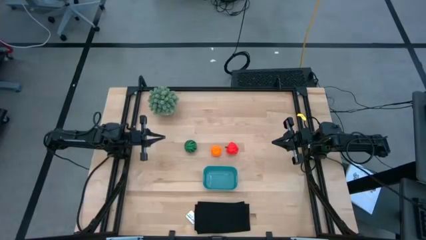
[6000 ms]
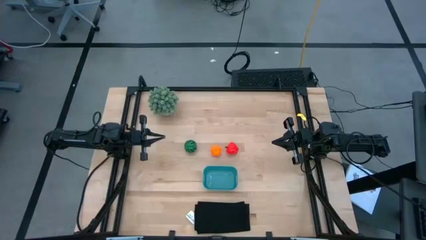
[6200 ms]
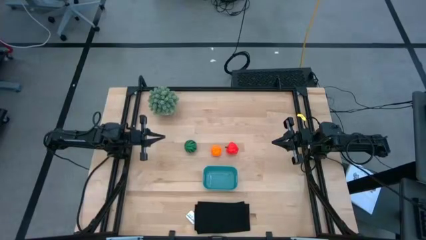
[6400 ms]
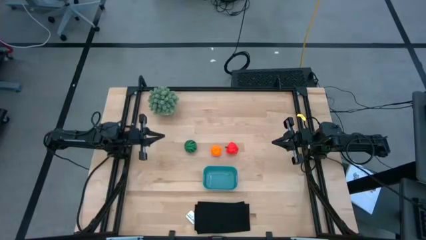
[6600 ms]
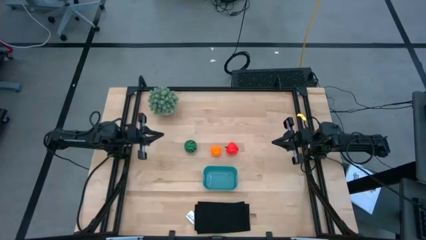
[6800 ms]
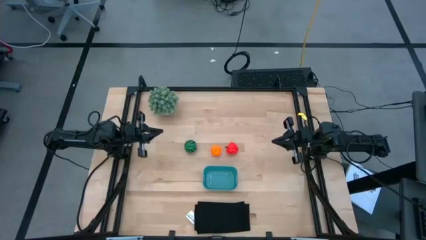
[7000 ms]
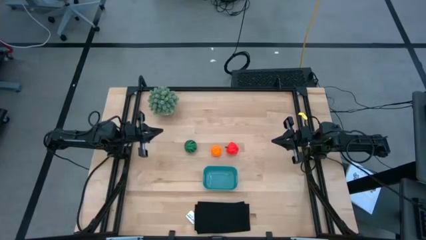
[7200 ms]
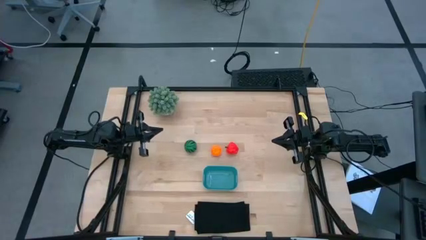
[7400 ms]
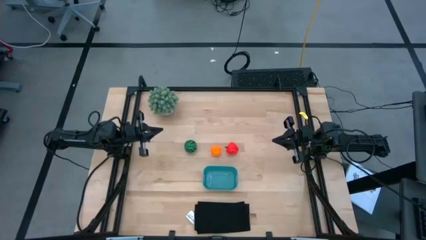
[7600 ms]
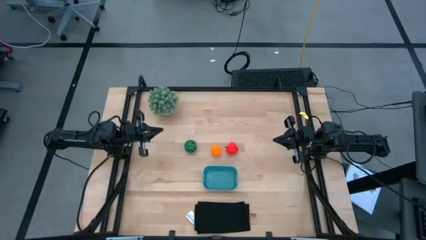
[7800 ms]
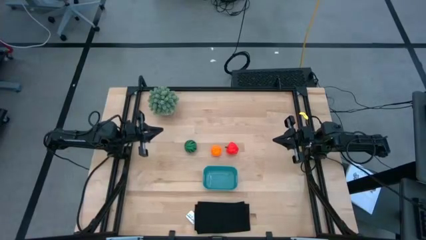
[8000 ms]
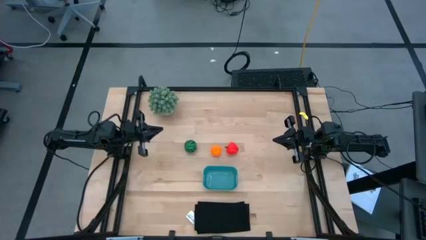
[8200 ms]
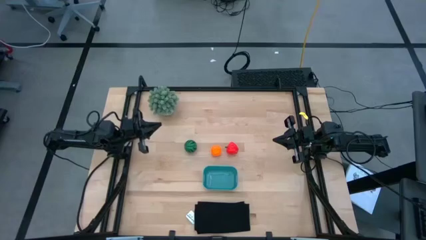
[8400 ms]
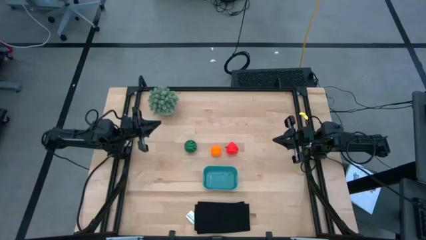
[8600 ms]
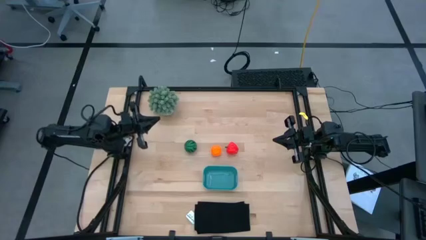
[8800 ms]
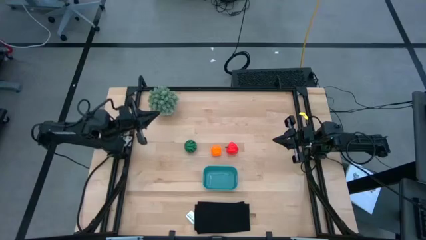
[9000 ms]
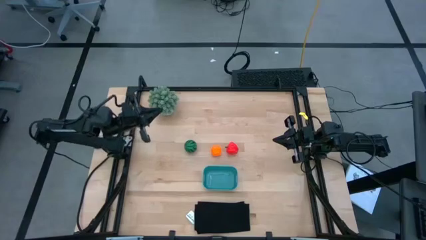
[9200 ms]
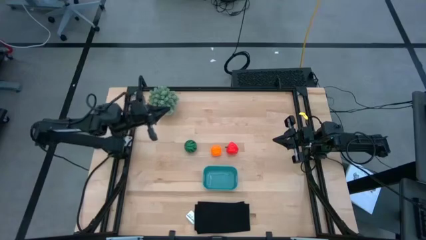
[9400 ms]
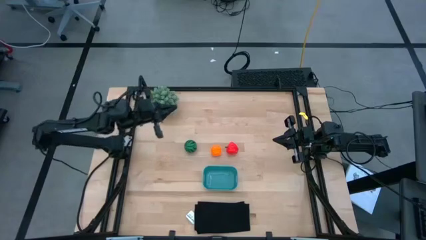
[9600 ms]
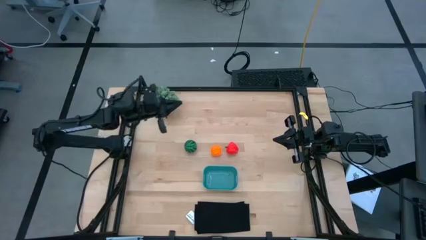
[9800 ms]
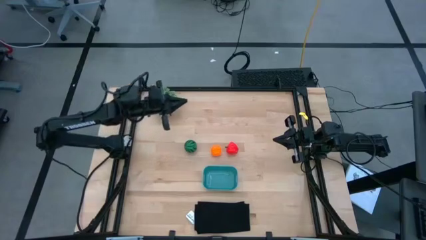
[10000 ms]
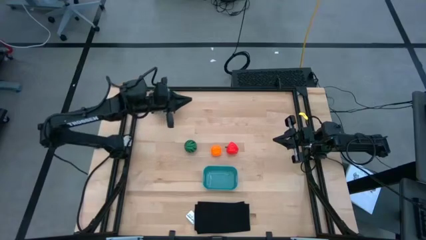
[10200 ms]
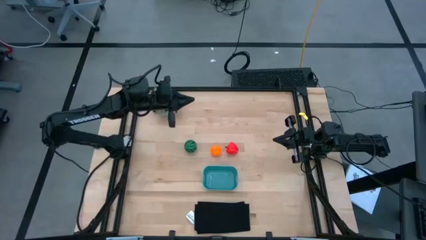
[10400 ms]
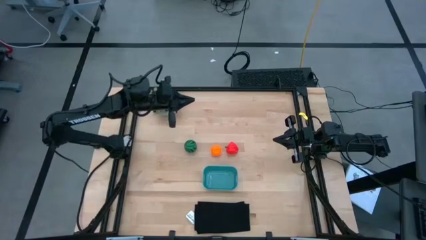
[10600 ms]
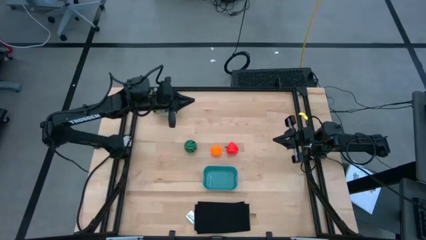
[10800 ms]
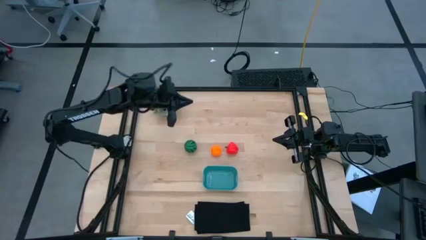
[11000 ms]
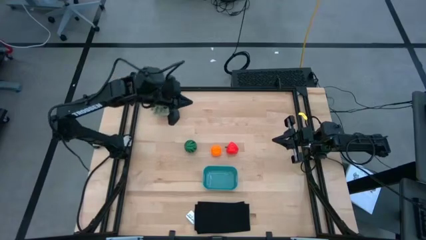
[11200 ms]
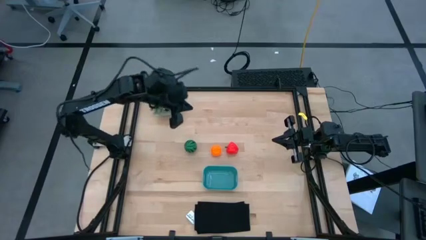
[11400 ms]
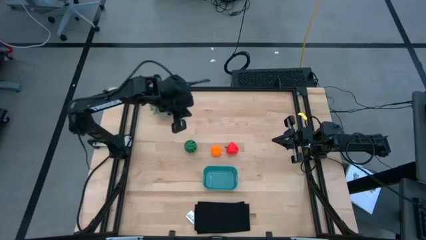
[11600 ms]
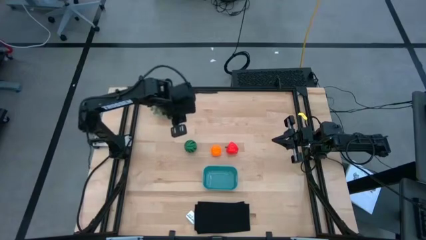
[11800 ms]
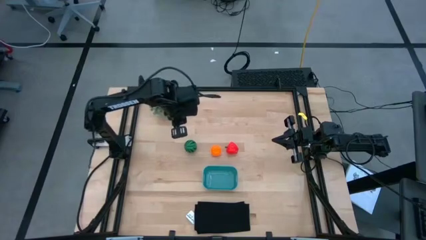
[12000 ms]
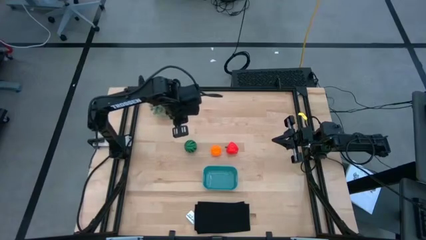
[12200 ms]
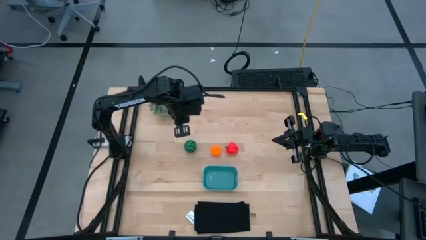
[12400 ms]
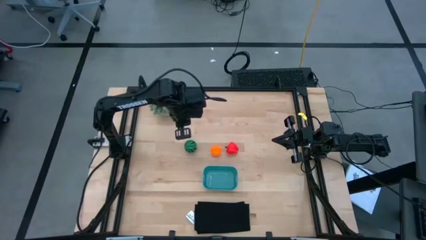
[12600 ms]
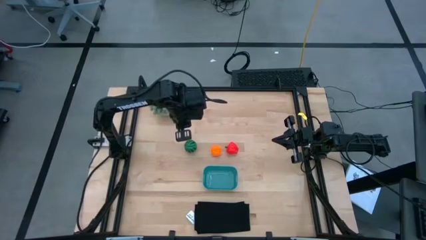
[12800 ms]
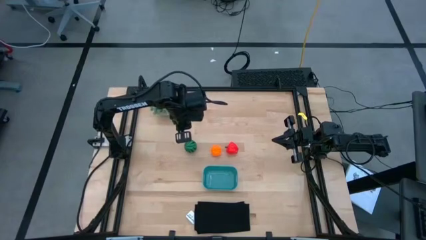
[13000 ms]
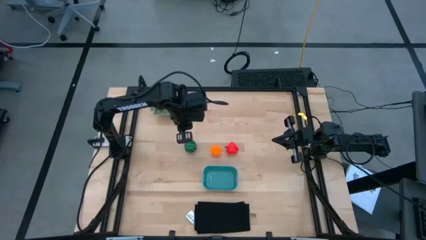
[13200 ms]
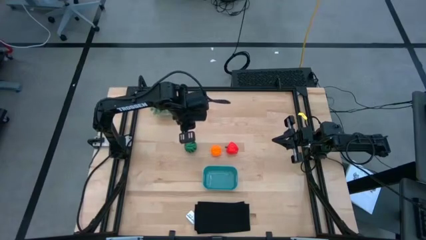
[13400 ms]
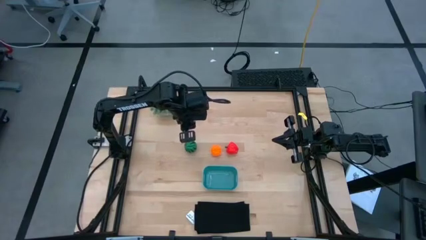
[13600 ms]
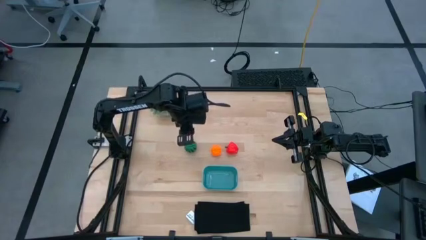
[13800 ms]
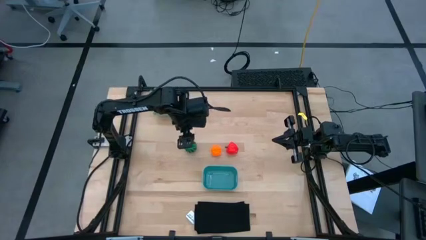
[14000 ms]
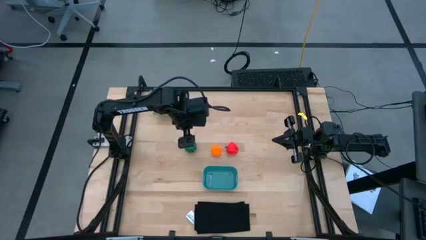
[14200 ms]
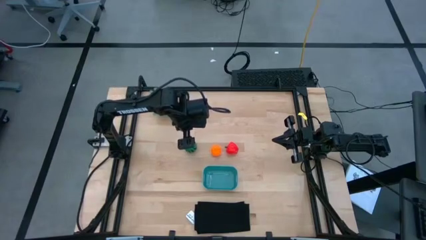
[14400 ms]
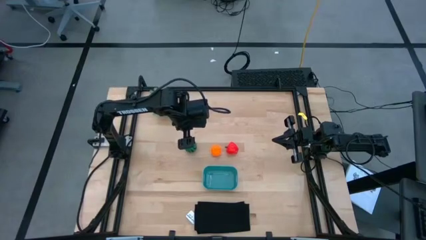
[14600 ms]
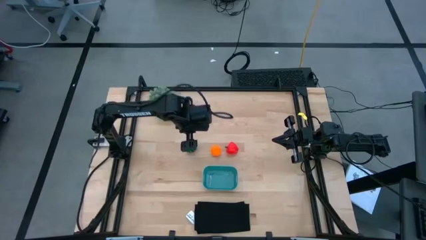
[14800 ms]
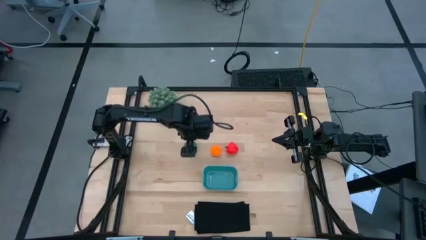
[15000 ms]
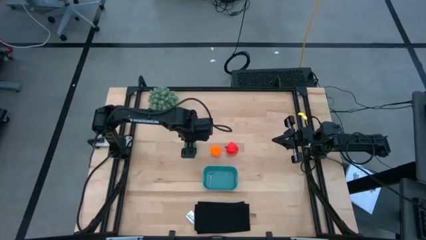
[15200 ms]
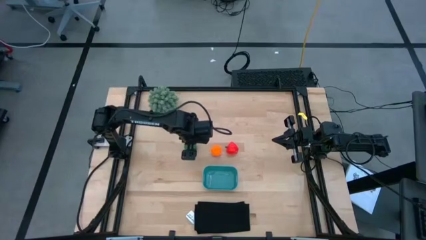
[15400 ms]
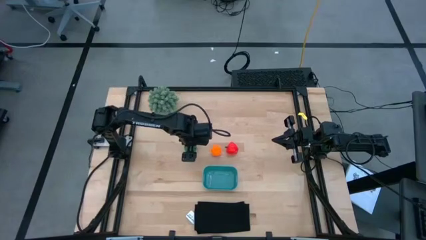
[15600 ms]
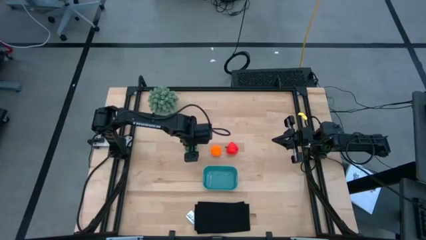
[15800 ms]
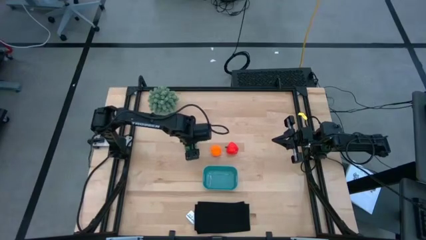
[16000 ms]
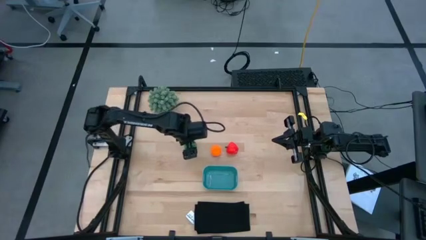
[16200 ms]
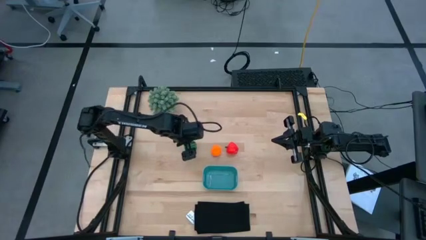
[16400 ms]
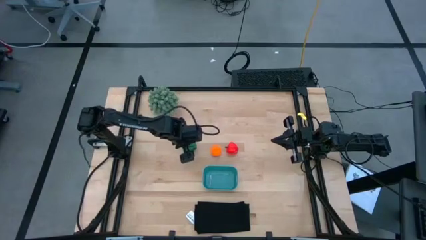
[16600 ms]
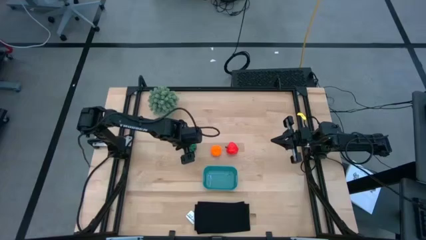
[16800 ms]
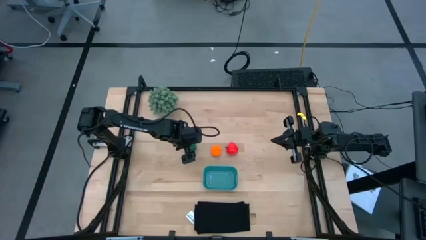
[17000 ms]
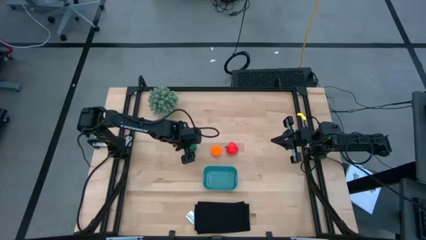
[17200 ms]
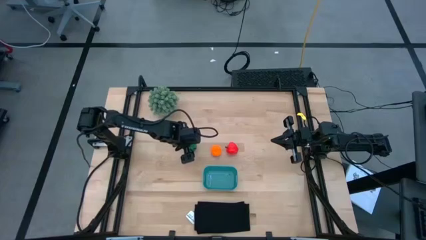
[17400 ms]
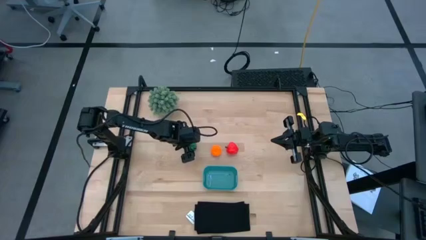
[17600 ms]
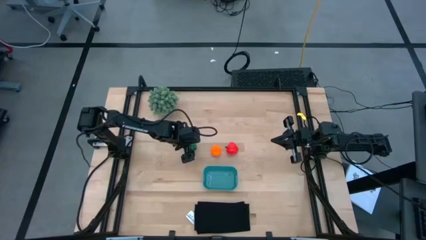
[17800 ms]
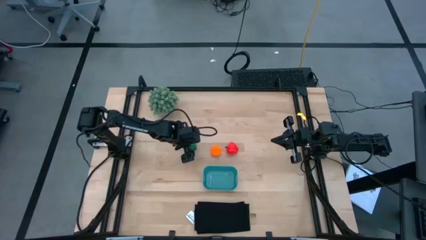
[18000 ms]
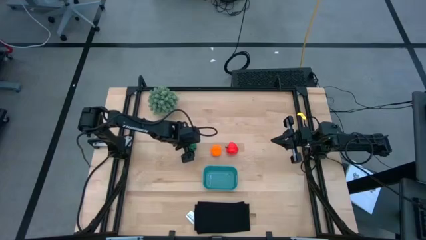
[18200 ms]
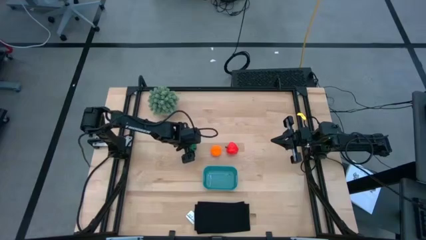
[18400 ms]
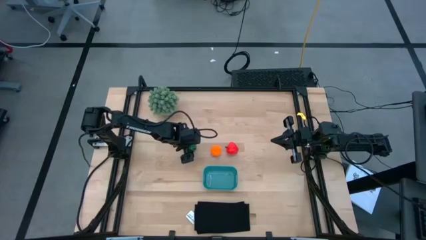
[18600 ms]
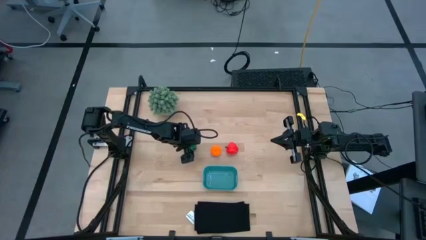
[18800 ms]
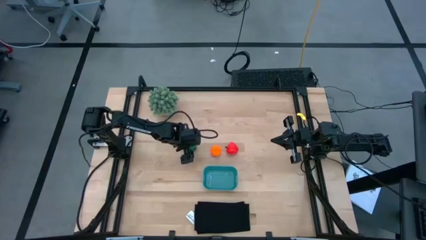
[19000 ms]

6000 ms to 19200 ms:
Task: Pick and placing Produce into tupperware
Put the watermelon into the blue bin

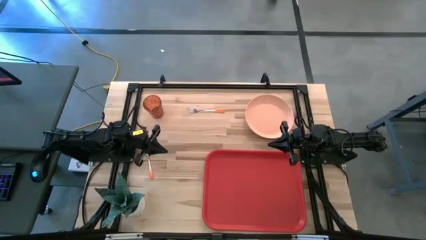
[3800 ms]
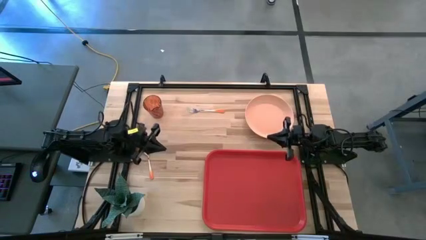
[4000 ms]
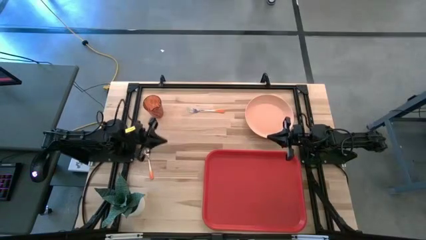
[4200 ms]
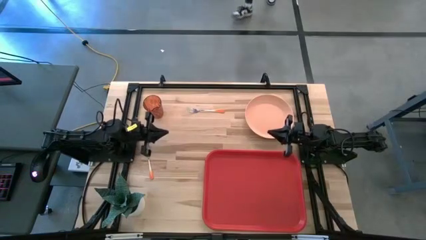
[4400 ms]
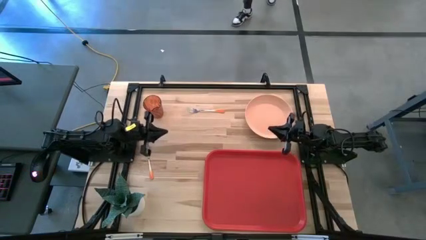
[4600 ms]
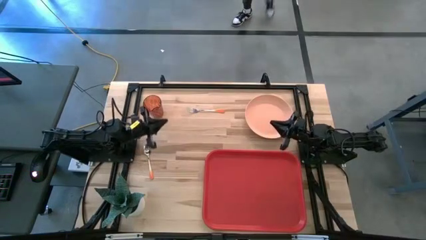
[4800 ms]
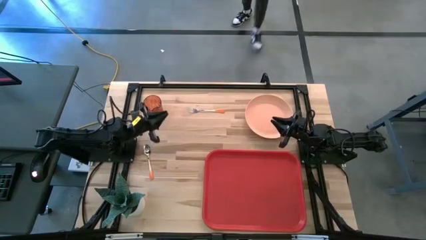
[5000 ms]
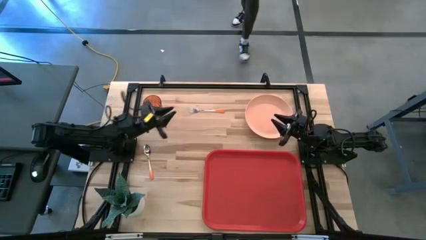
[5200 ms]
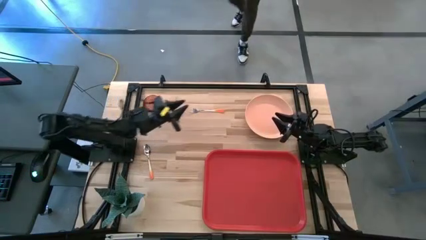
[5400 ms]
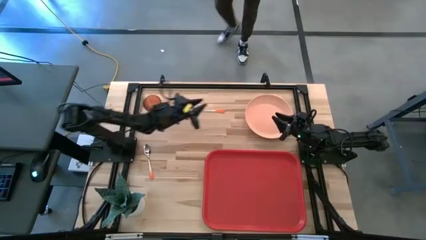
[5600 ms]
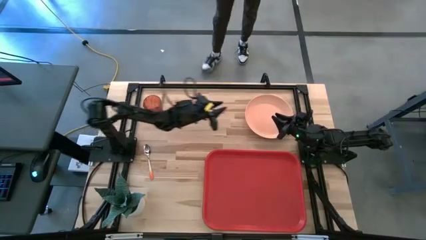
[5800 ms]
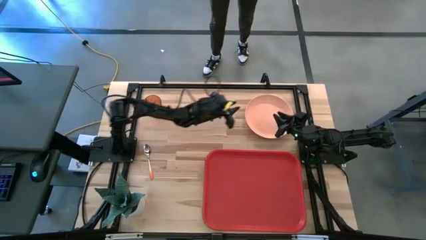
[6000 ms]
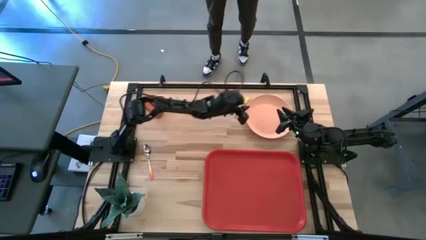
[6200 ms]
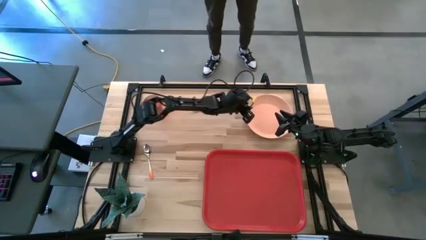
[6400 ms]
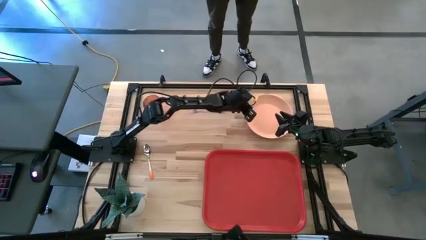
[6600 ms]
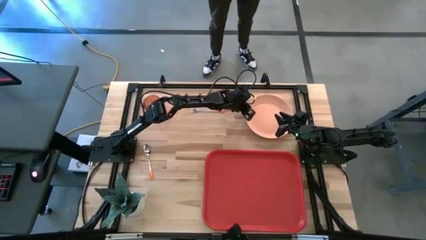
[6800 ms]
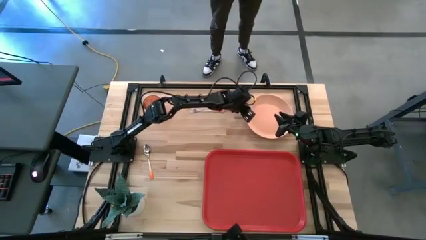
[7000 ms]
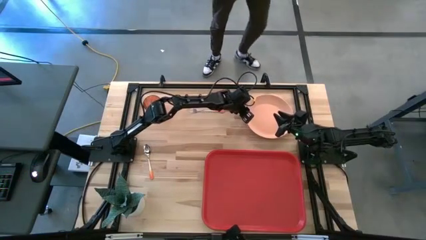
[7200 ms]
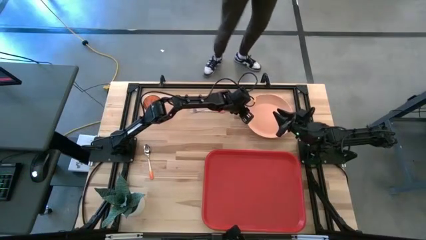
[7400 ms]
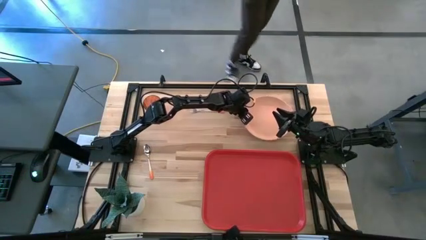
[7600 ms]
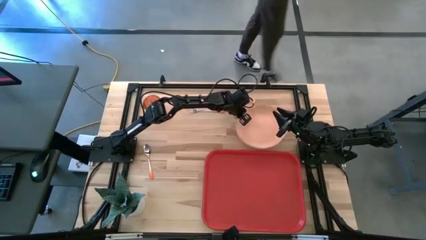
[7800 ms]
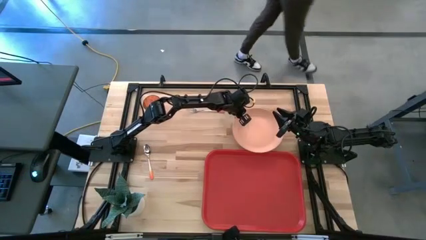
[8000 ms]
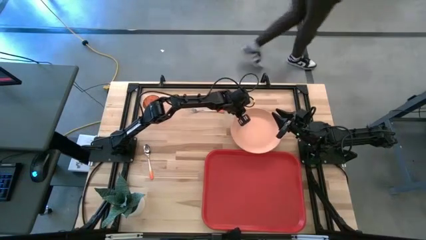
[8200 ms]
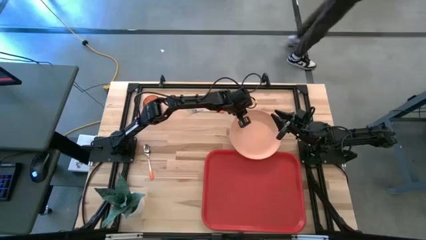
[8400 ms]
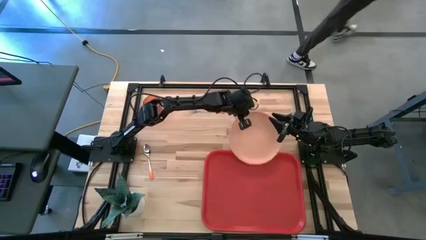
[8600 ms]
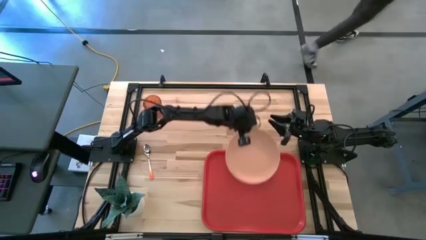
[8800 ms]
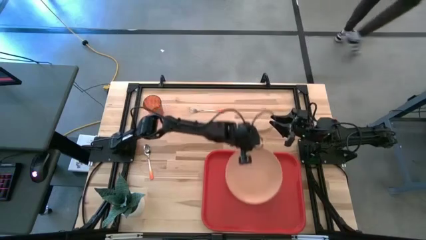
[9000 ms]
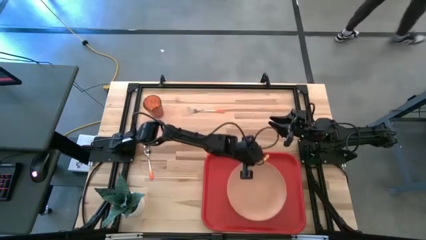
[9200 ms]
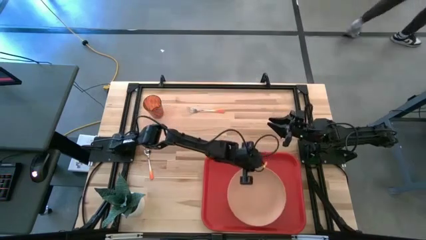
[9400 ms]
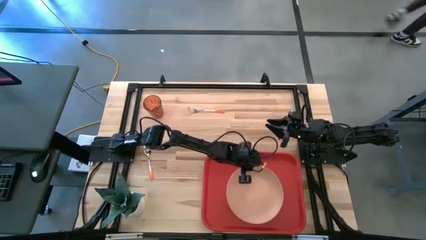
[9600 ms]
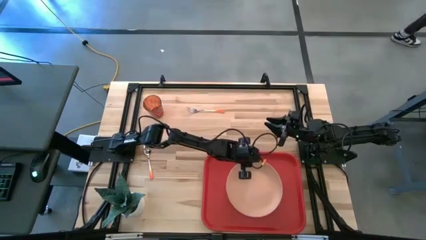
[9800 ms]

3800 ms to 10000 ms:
Task: Pick and place plate/cup/fork/spoon on tray
Put the light orange plate on the orange serving tray
